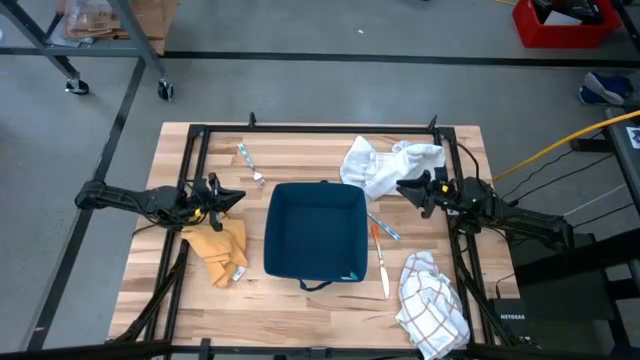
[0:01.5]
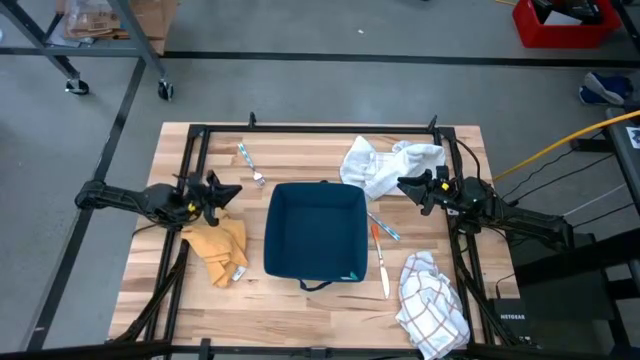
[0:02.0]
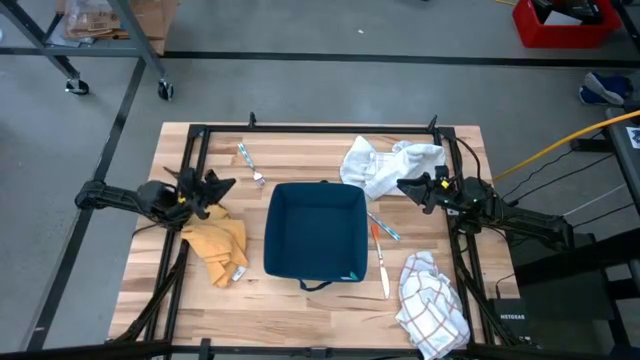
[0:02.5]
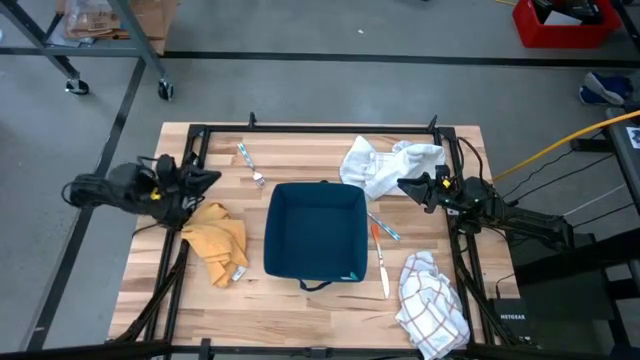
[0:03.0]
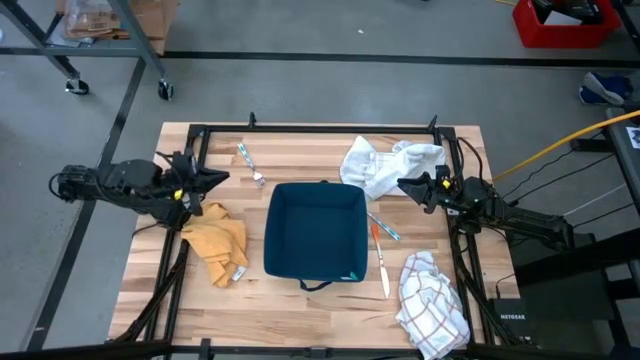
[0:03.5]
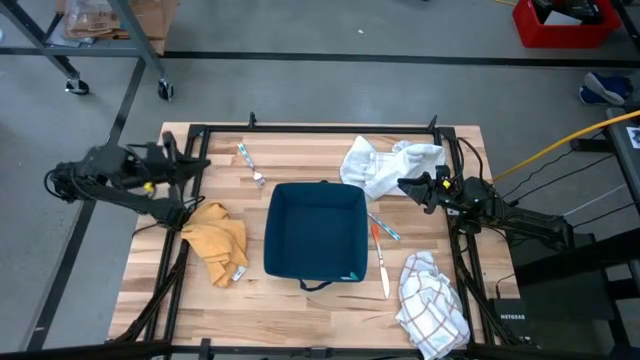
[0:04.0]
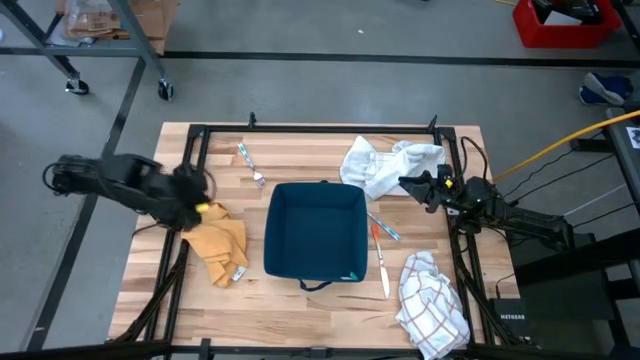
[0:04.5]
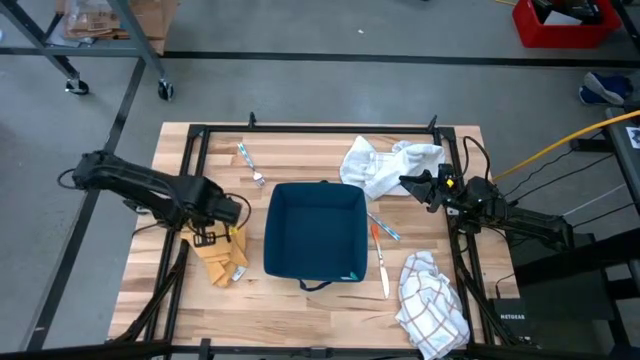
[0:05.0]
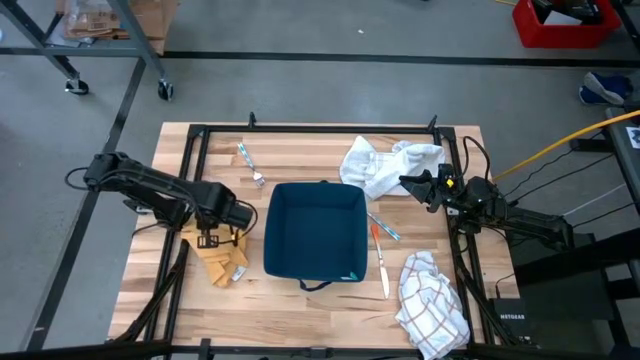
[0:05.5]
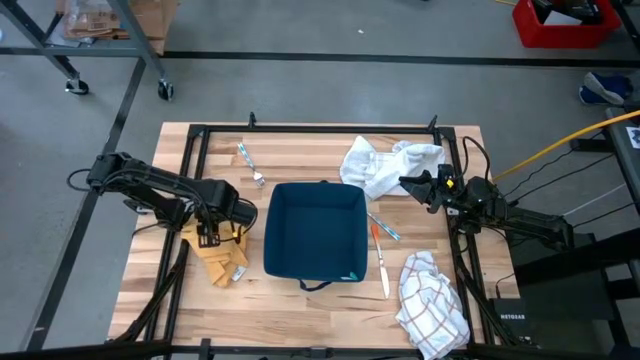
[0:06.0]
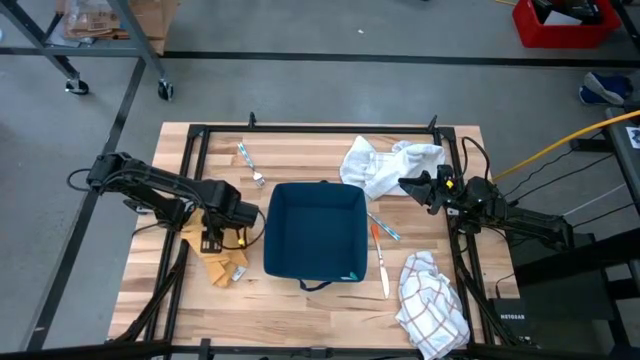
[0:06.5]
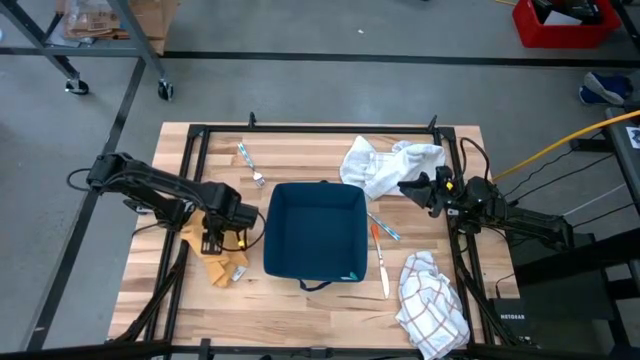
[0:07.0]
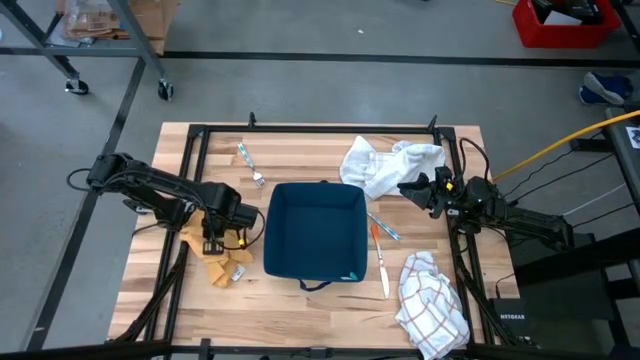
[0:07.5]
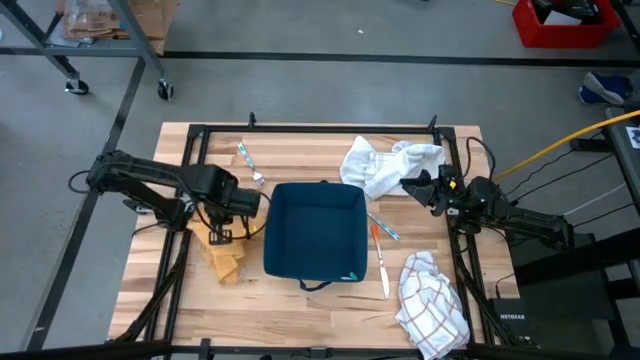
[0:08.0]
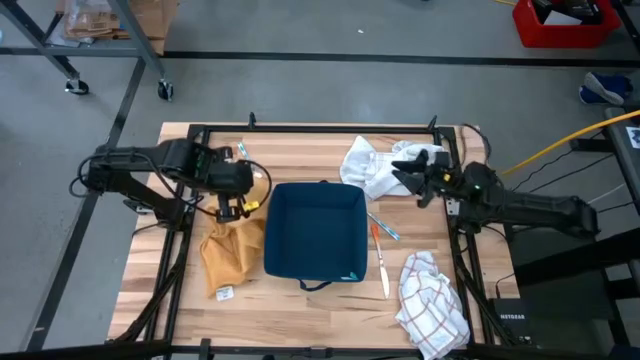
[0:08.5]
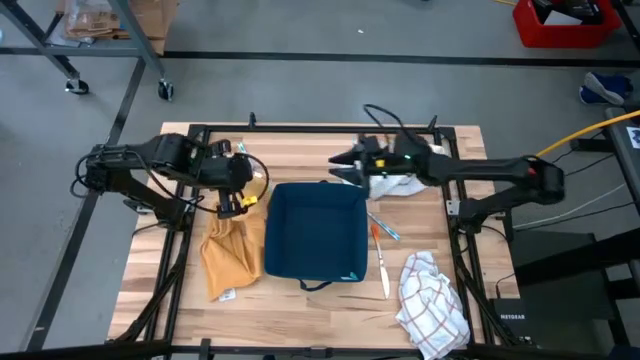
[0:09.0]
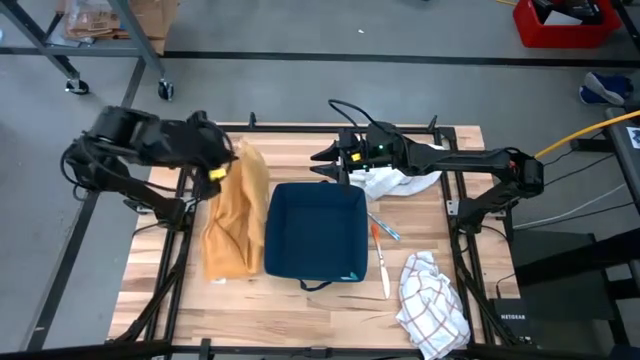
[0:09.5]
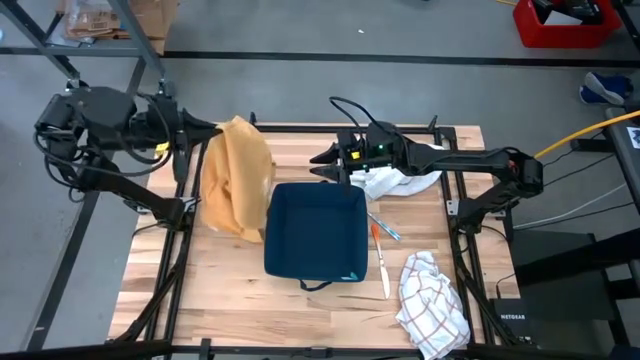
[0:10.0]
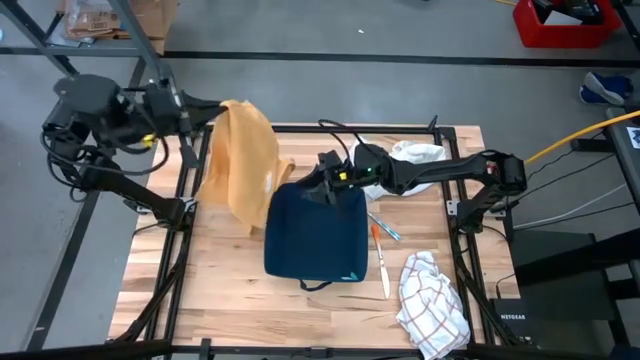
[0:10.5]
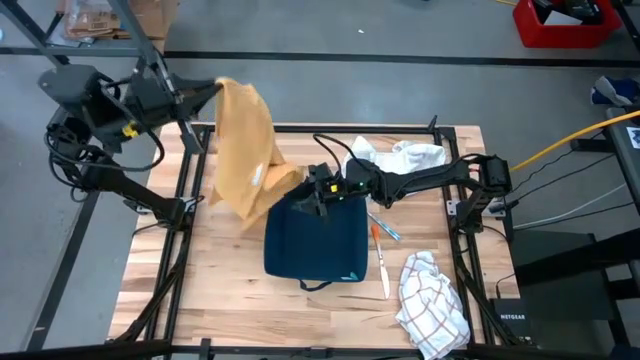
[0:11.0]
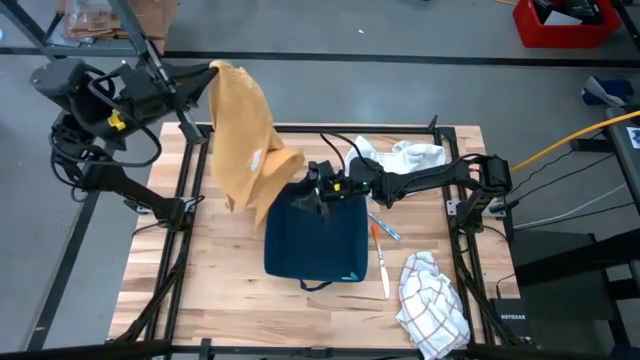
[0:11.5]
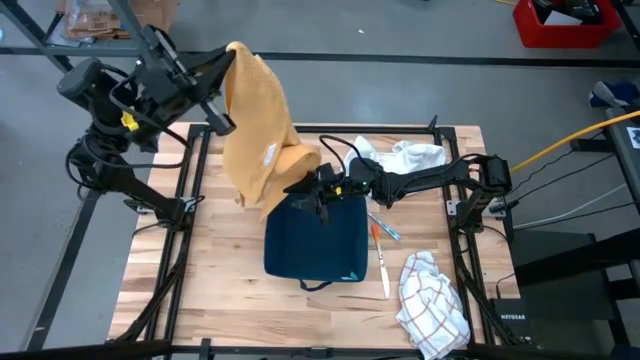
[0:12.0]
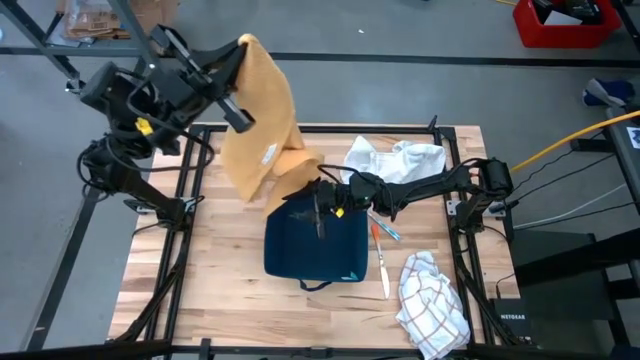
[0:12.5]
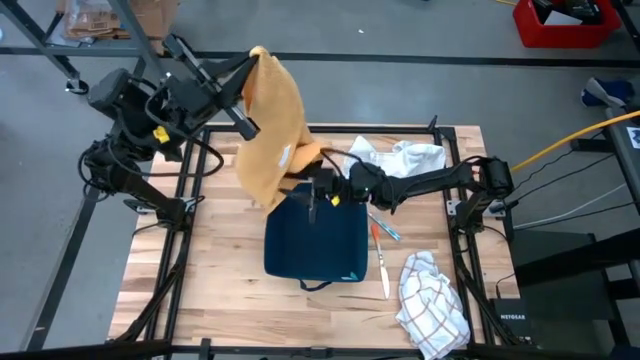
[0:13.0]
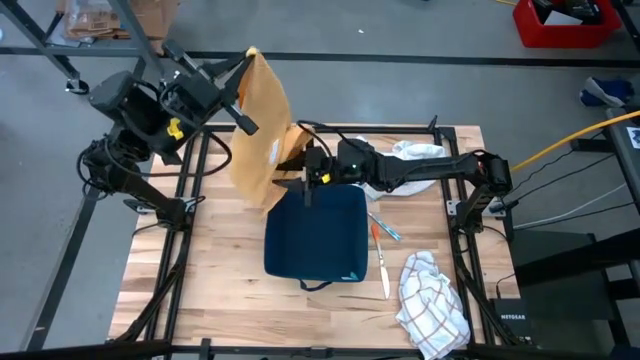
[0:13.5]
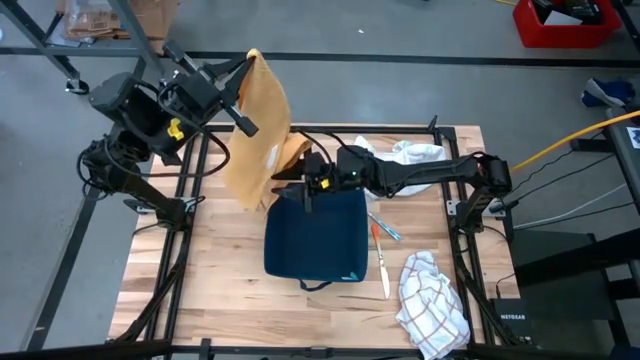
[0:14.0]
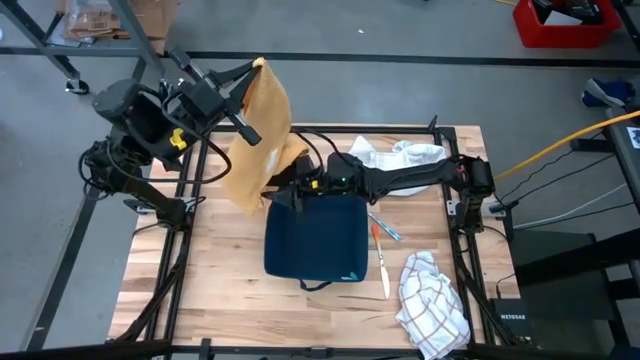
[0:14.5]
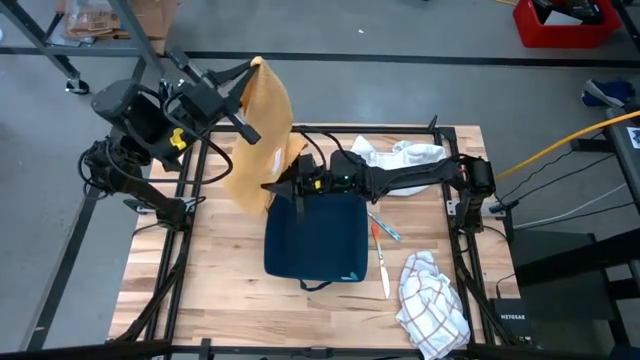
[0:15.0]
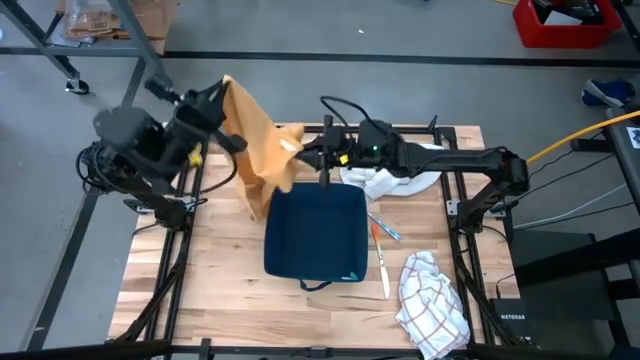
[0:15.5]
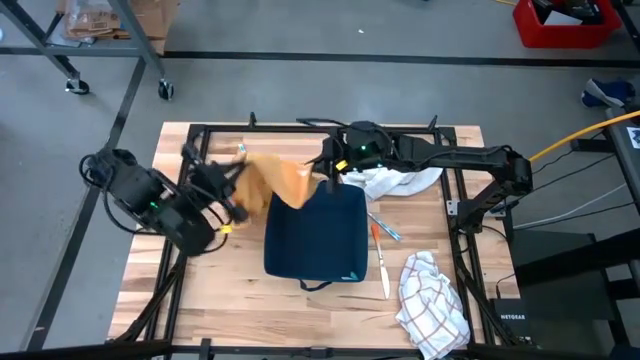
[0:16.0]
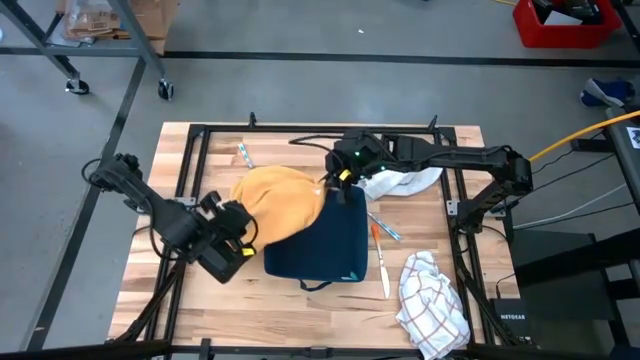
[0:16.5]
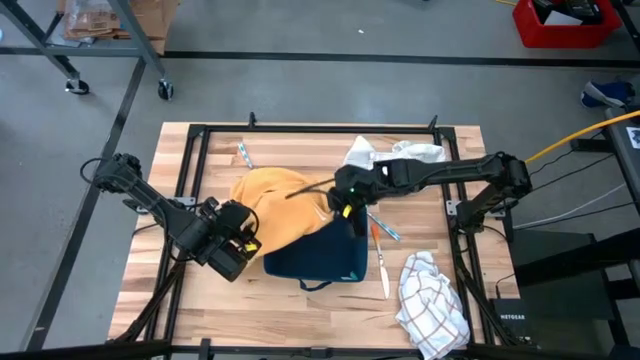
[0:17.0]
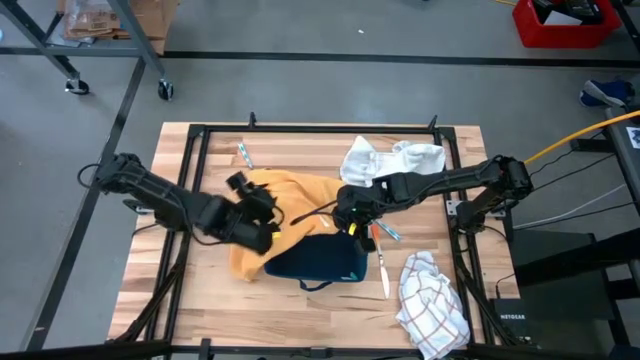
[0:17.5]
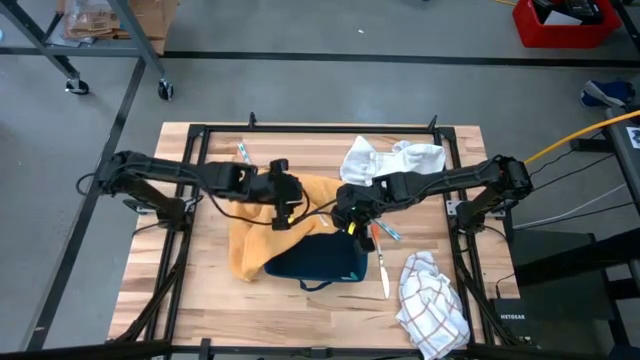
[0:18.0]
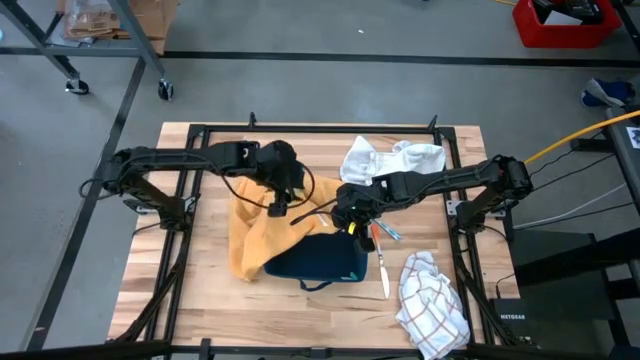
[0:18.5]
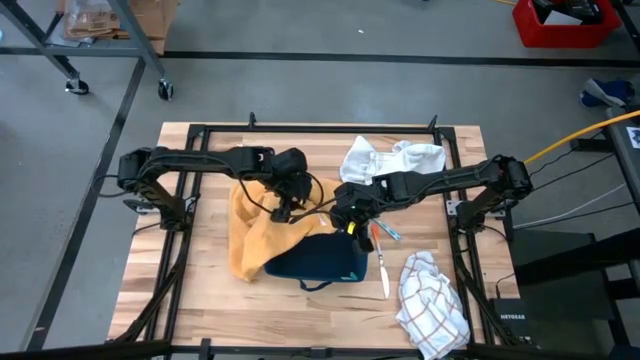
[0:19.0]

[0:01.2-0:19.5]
Task: Fold towel
Fold the yellow towel
